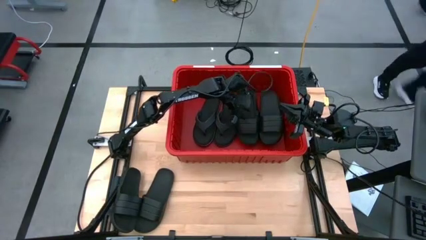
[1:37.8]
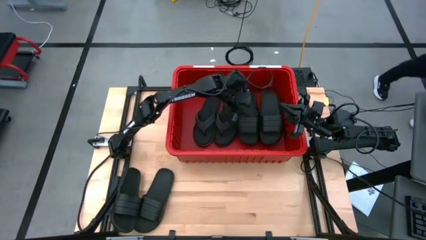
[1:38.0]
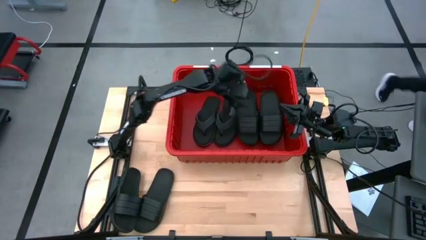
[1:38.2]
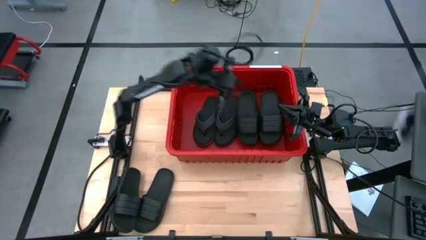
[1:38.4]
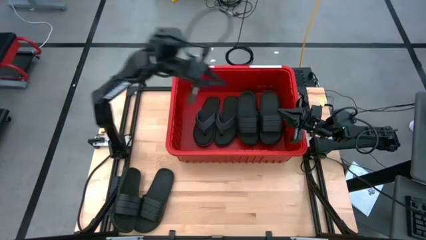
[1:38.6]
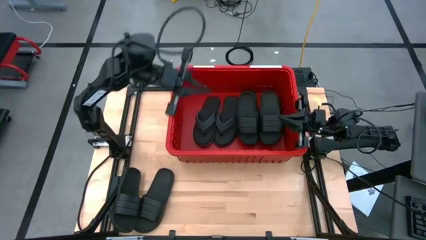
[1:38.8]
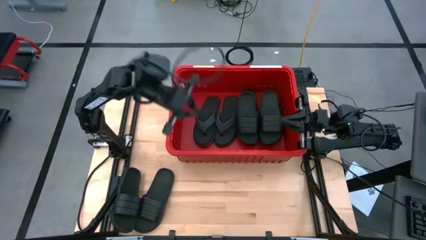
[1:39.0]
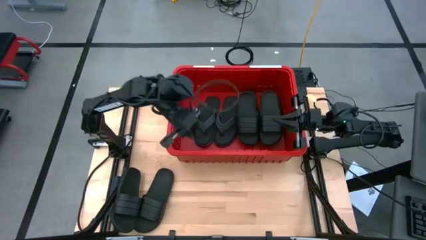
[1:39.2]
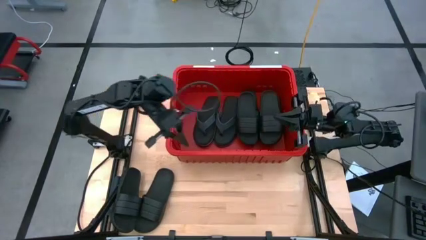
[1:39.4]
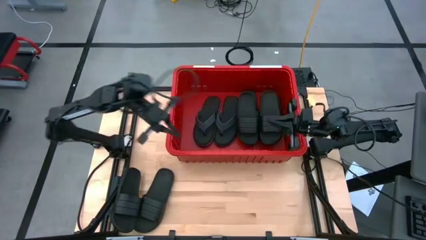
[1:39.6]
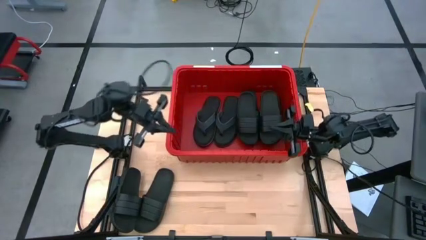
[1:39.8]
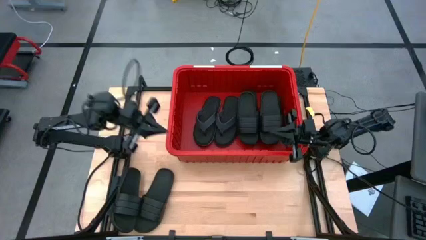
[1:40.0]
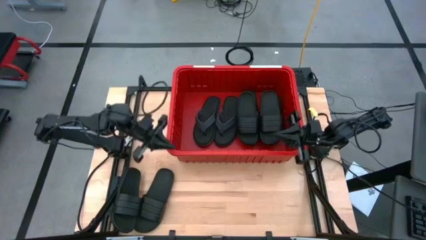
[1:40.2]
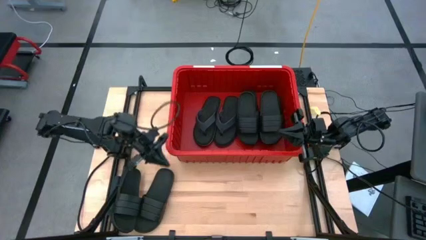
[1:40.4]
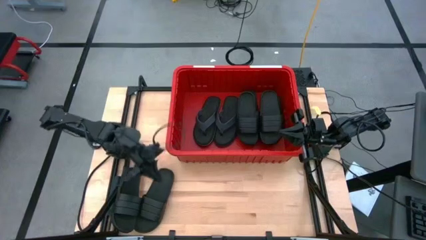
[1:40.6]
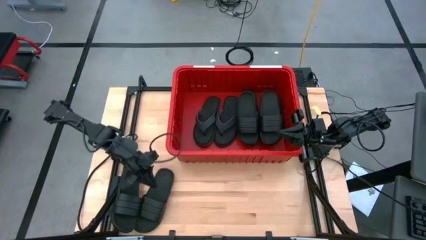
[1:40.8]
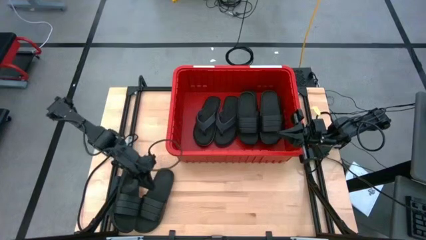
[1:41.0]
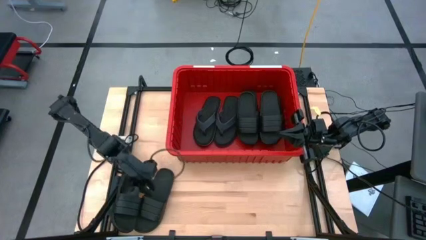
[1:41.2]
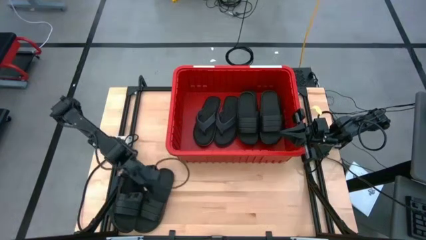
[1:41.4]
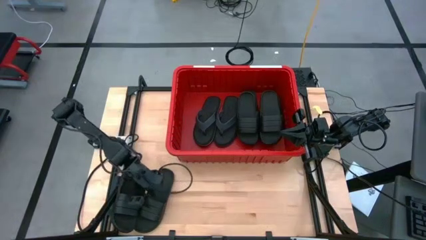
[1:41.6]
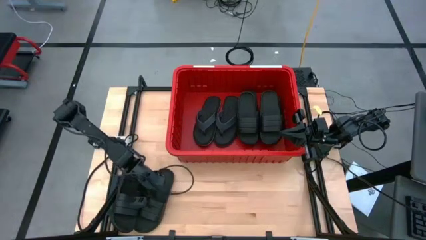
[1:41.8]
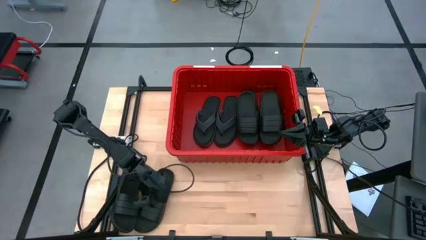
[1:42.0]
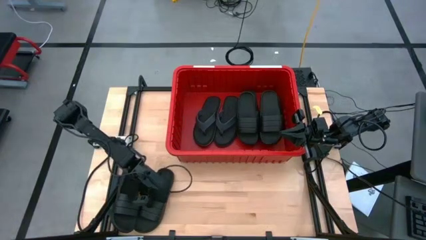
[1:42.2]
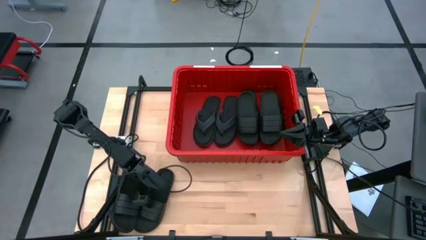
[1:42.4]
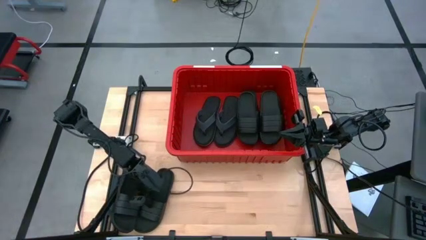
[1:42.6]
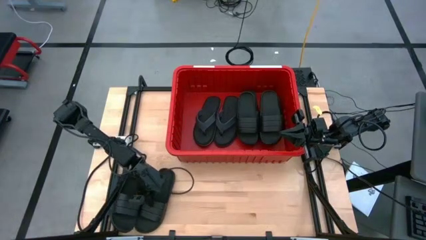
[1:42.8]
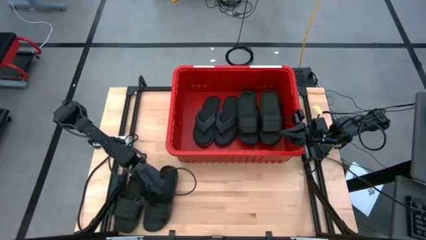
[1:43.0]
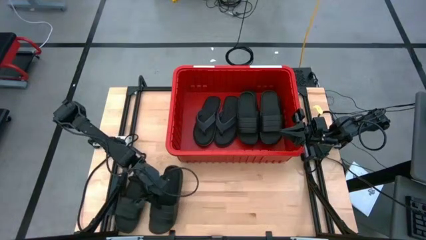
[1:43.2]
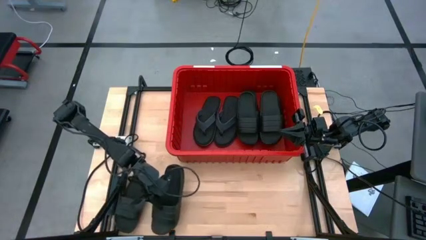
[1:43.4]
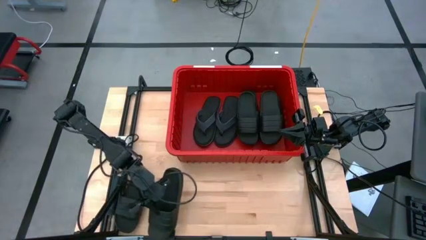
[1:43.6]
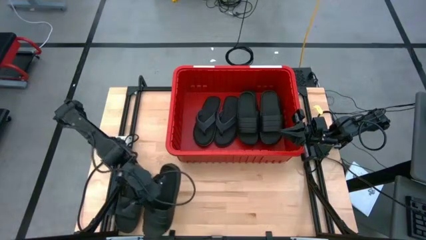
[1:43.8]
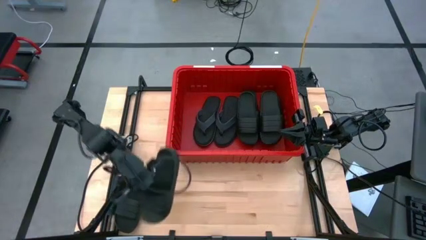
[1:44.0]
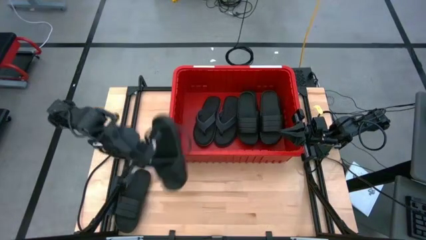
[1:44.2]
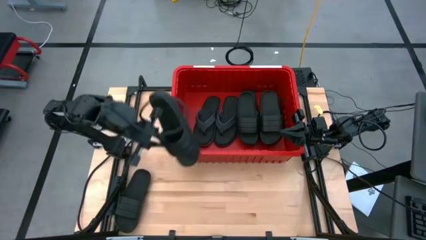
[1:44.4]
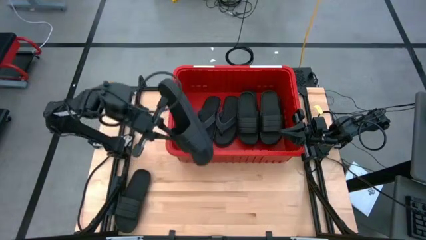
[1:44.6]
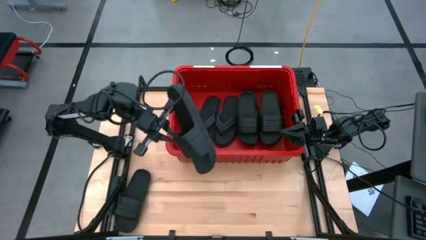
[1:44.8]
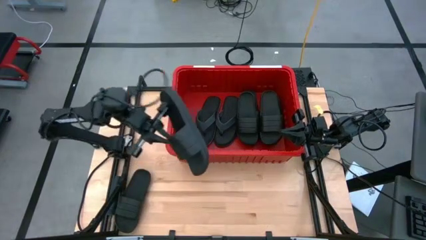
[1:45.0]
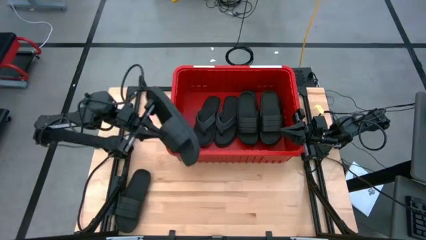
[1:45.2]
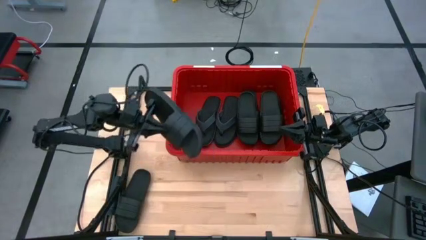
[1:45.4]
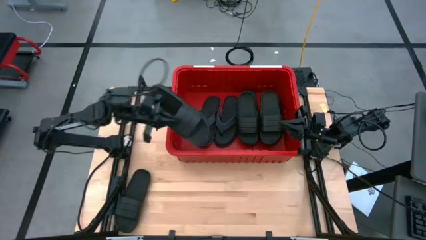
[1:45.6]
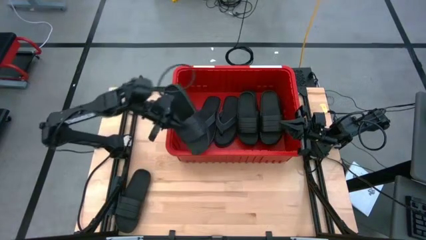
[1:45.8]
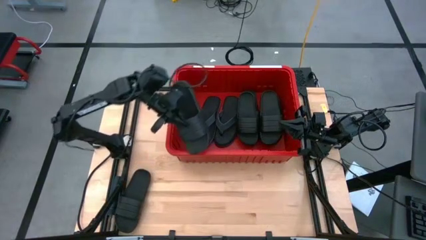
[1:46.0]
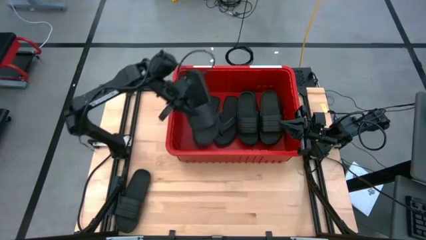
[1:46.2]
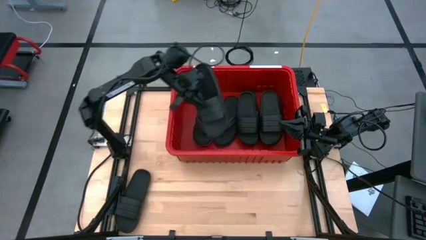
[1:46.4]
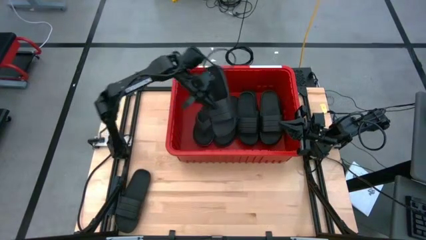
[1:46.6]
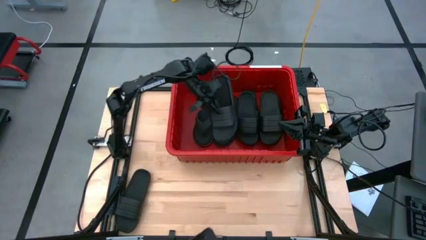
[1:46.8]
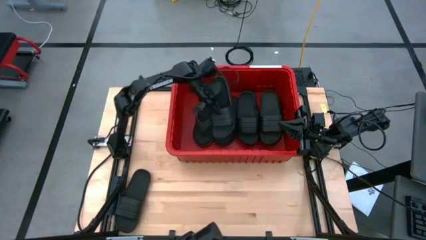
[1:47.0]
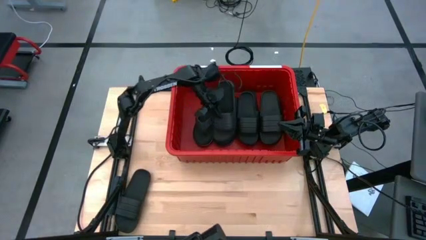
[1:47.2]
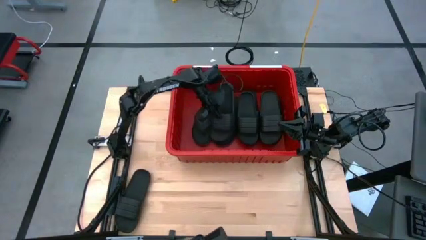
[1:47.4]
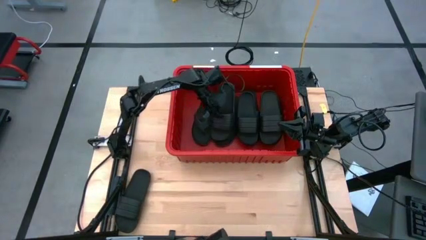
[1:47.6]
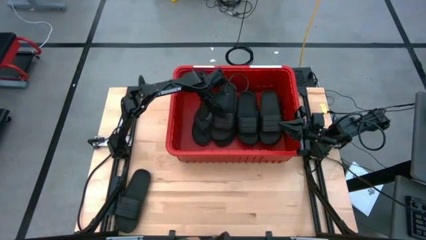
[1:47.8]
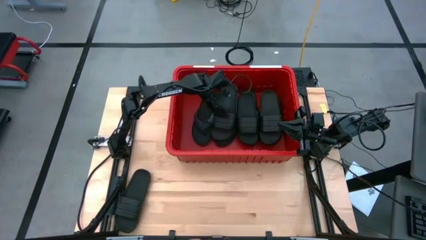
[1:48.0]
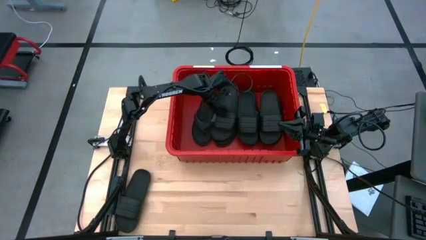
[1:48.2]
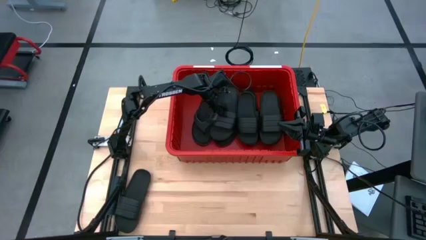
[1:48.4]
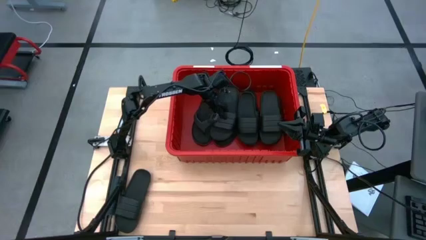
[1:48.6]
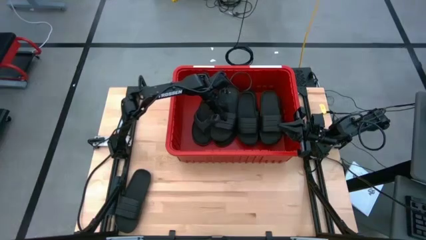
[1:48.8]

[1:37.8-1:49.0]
Task: Pick and place slides into bin
Put the black slide into the red container
